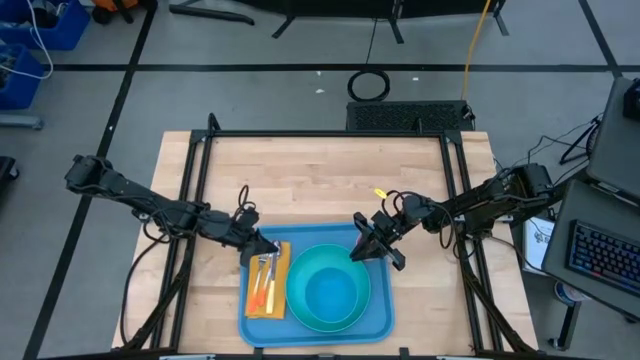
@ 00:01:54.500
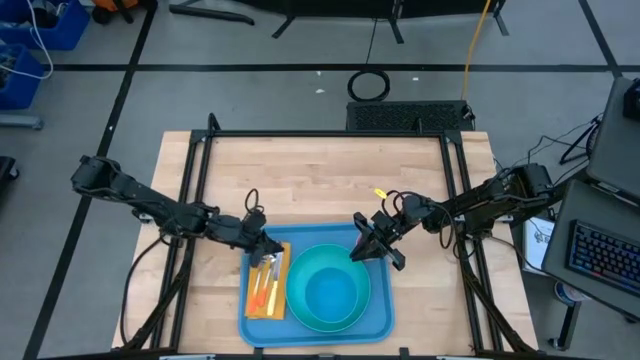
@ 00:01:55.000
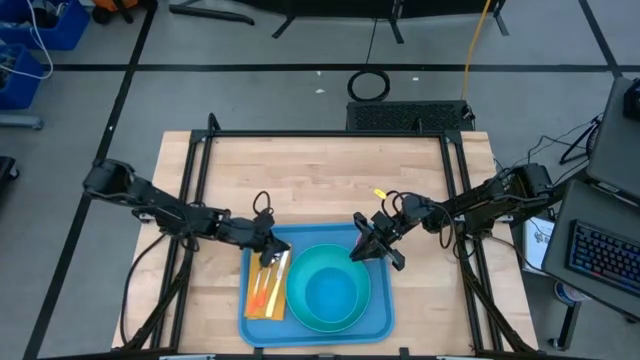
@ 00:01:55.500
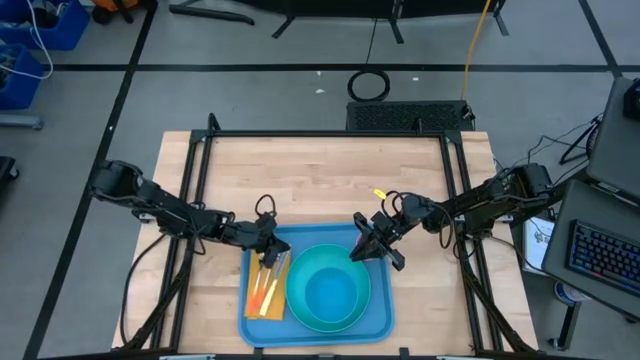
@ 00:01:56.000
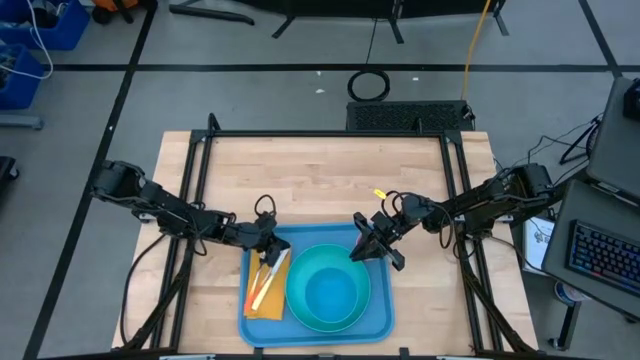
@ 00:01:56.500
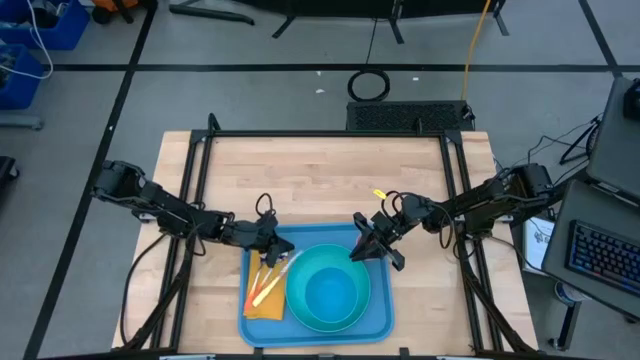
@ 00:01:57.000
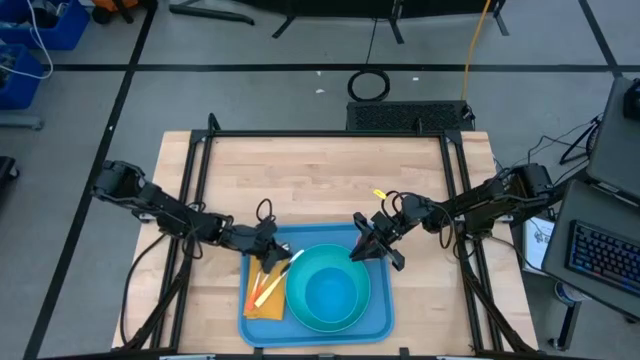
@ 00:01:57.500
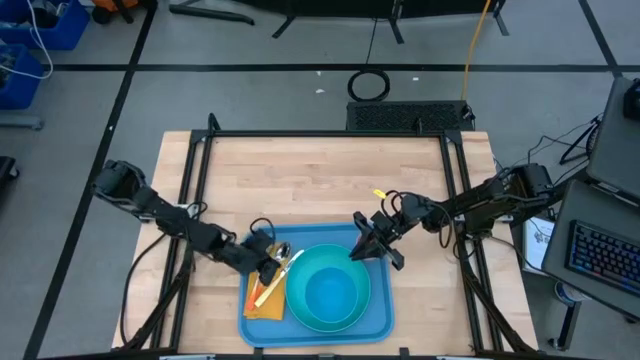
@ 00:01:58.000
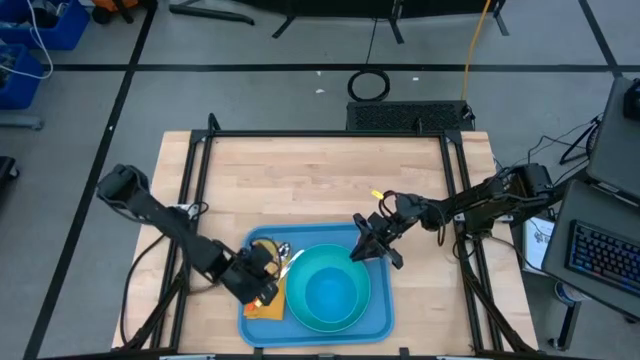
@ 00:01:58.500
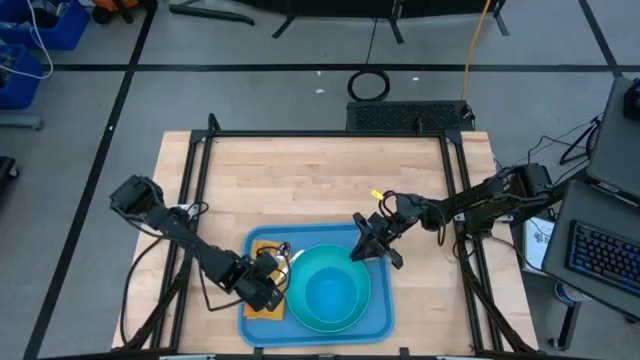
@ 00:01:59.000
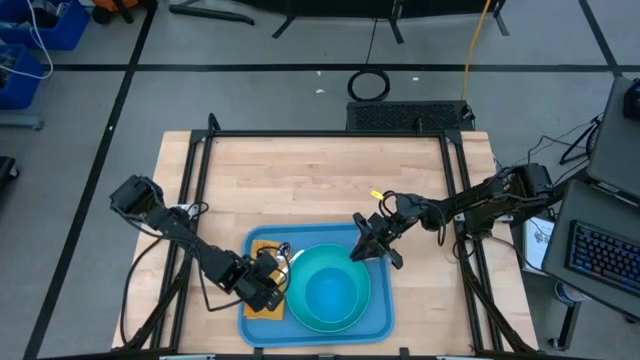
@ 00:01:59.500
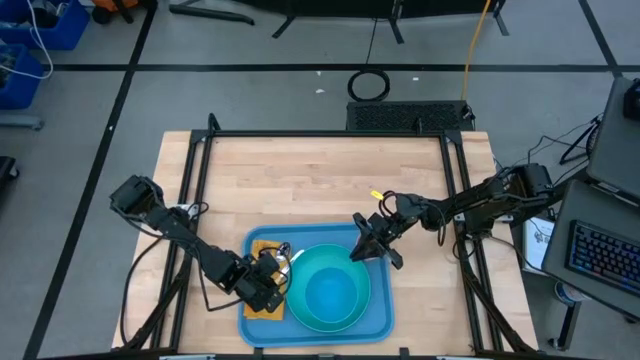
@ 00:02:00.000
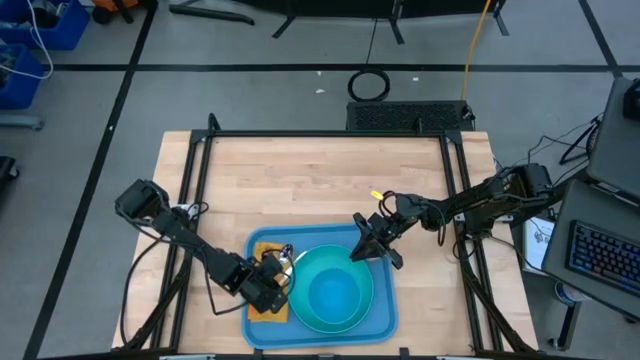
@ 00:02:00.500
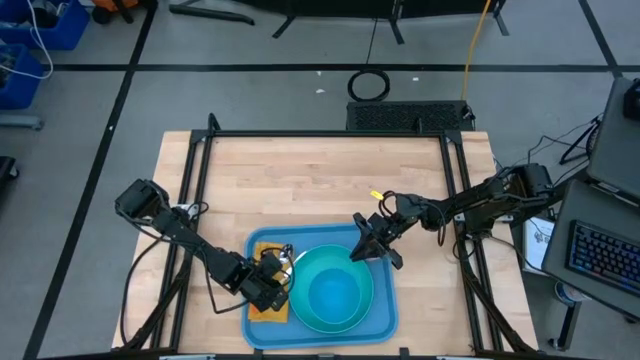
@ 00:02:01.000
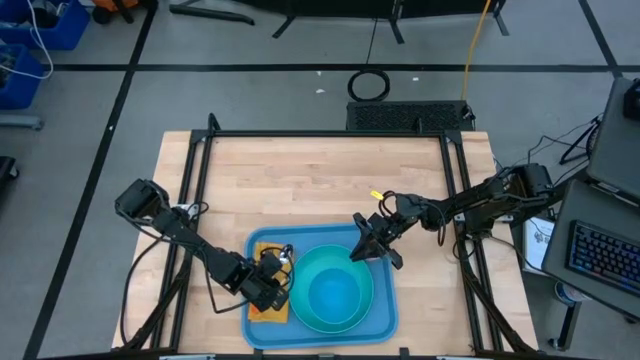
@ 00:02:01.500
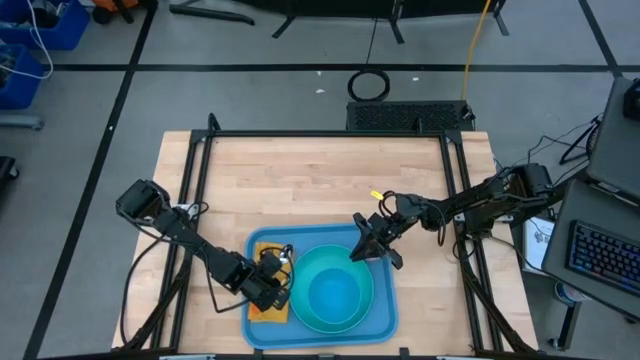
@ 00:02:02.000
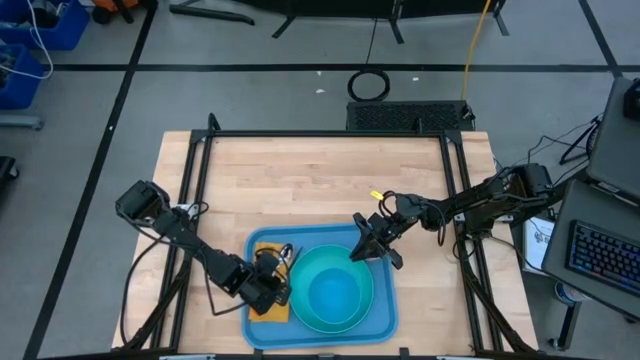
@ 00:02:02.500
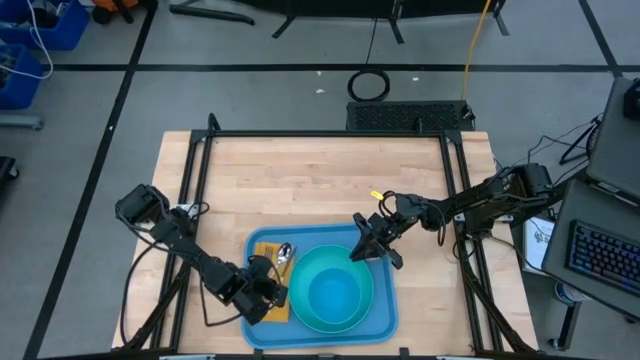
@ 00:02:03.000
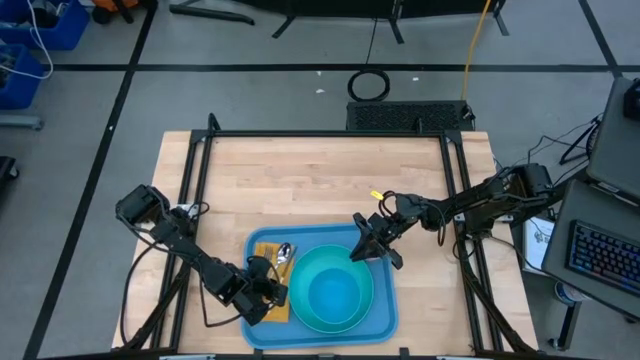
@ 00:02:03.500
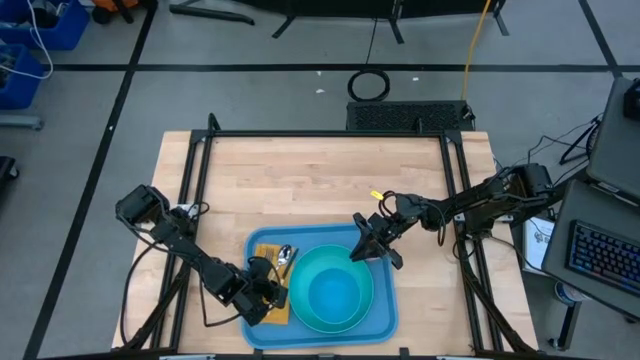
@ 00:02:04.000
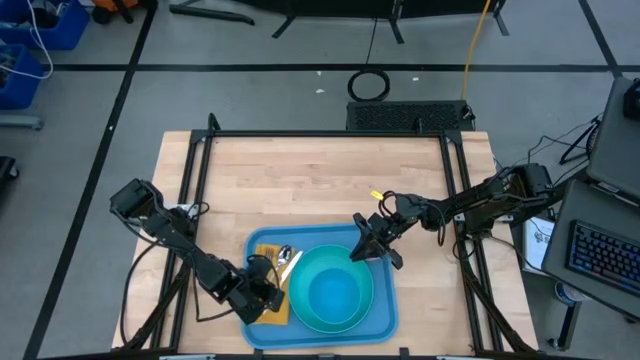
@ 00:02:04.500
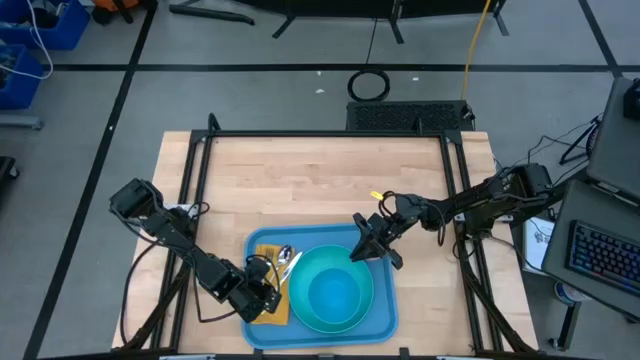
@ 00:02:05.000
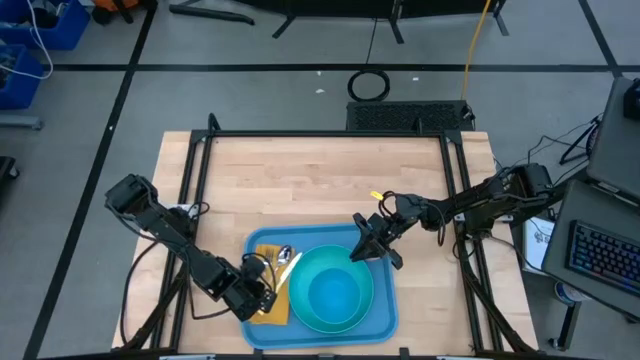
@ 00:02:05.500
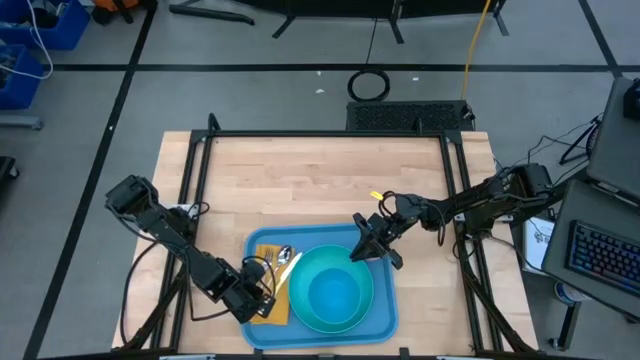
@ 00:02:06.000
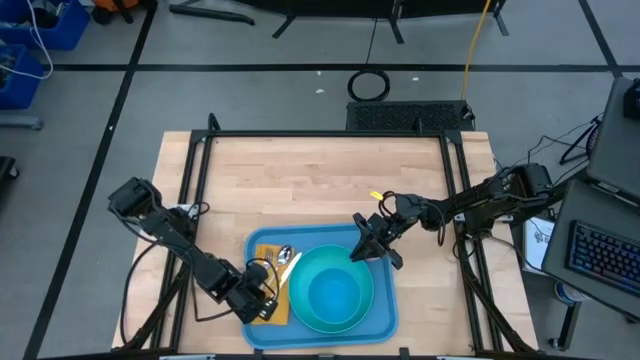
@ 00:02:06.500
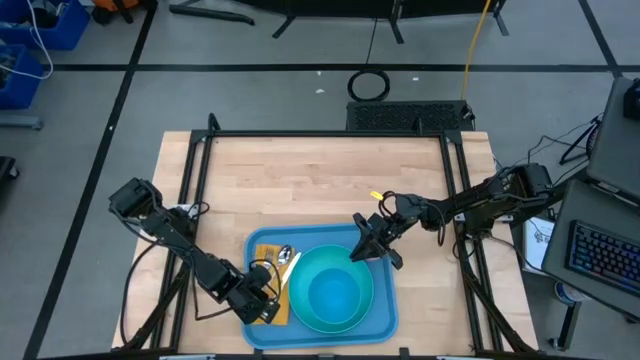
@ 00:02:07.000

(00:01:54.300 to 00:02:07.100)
Task: Set up tray
Put the white table knife on the top of the yellow table napkin to the right of the orange spoon

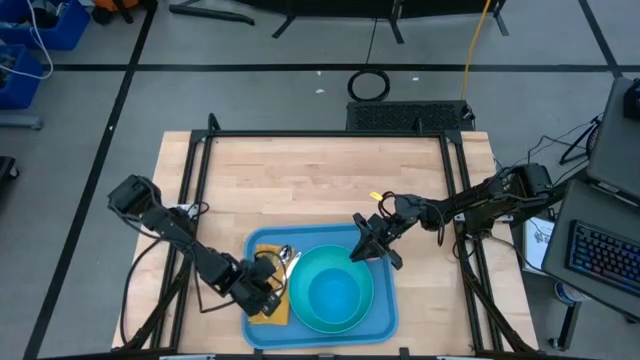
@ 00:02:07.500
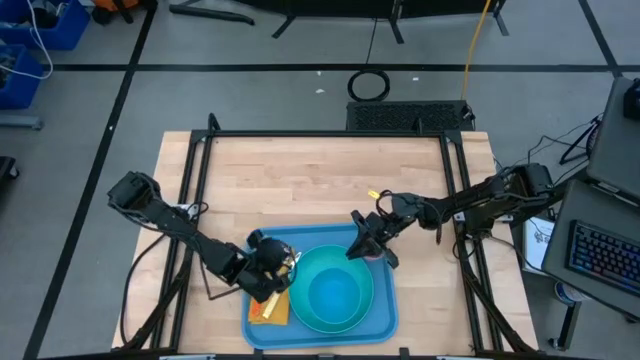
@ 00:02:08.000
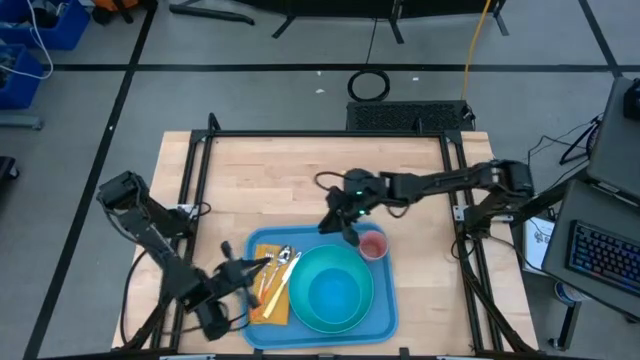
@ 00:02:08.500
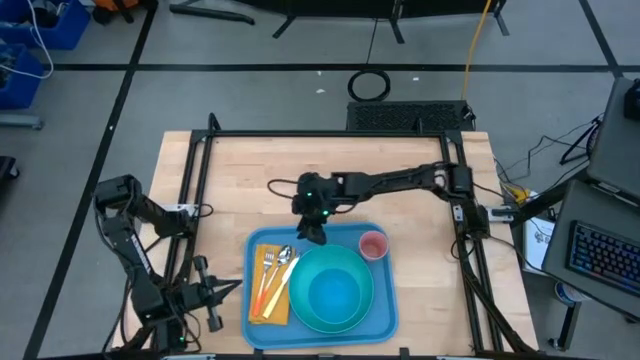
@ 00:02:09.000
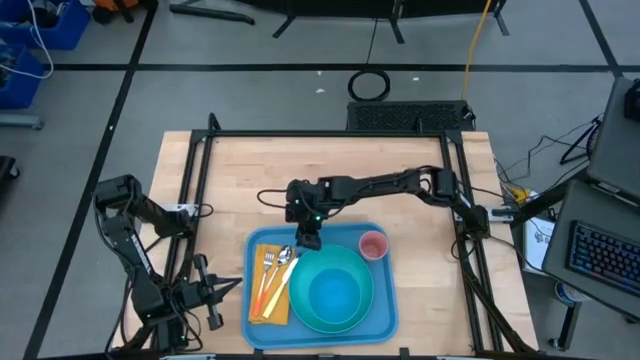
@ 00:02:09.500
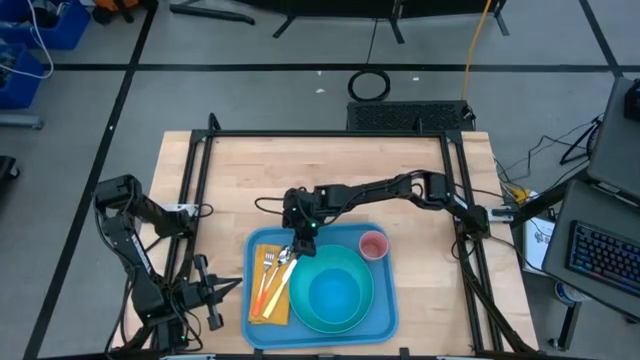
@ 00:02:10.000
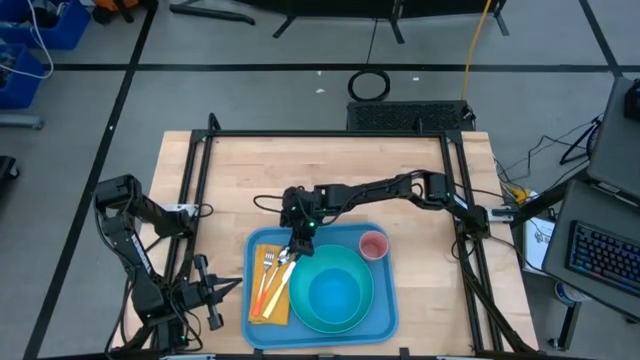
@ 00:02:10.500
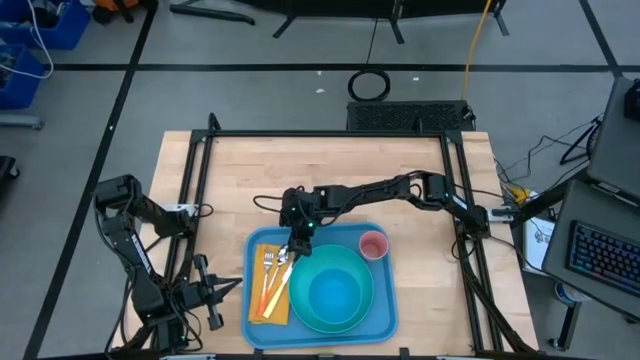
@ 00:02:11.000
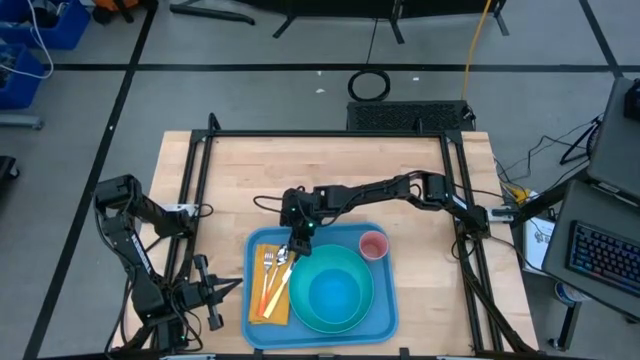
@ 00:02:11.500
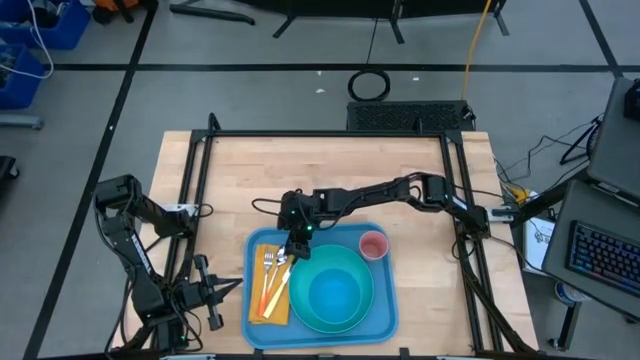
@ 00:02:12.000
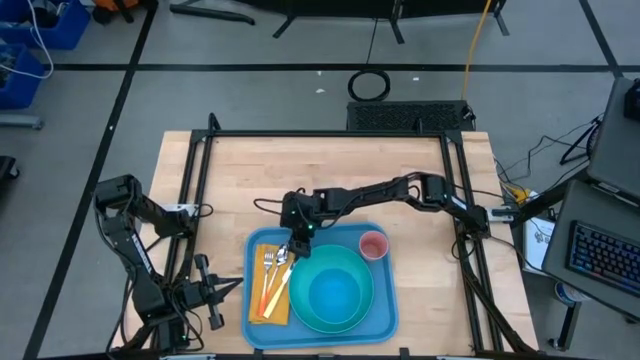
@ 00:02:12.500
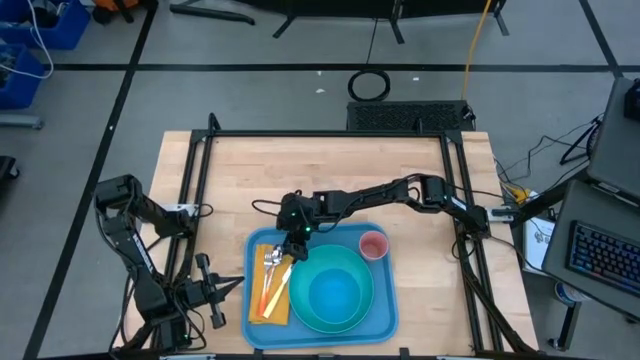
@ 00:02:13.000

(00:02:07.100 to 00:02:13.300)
Adjust the orange spoon on top of the yellow table napkin

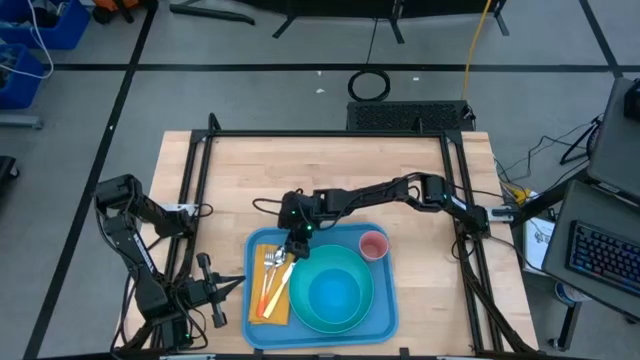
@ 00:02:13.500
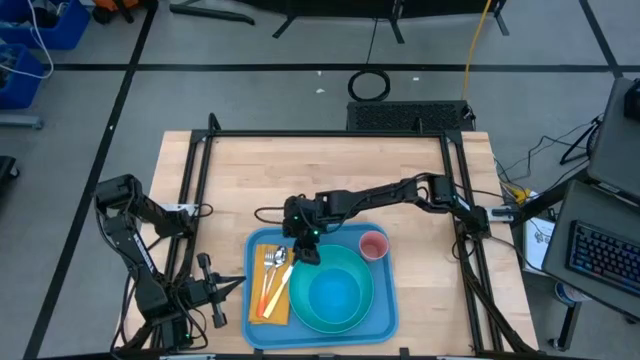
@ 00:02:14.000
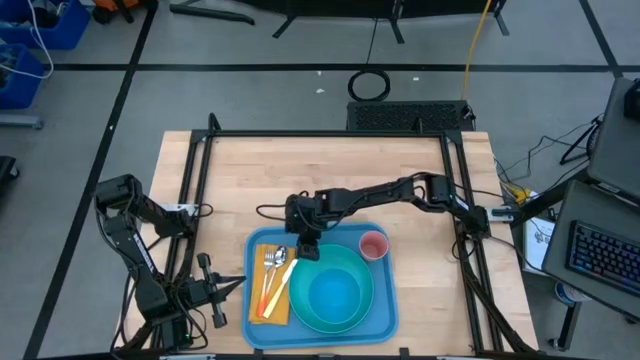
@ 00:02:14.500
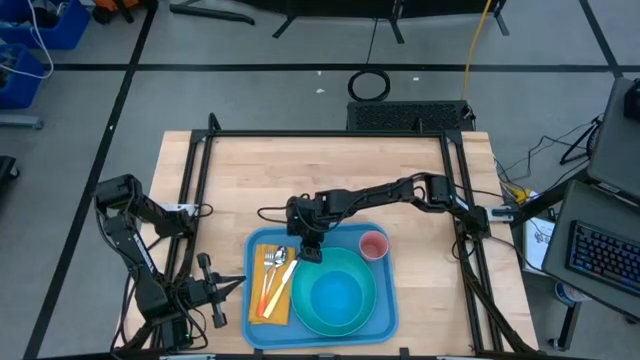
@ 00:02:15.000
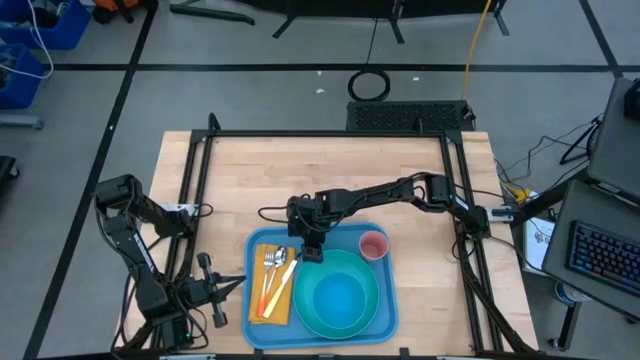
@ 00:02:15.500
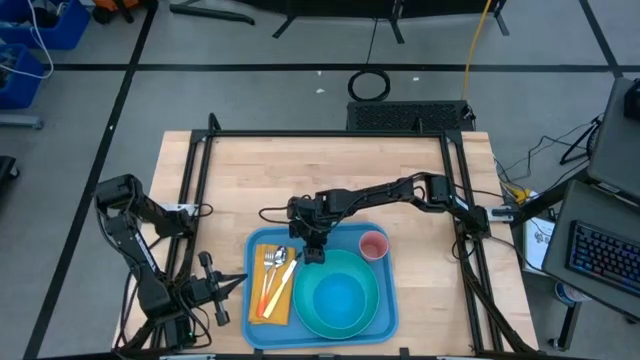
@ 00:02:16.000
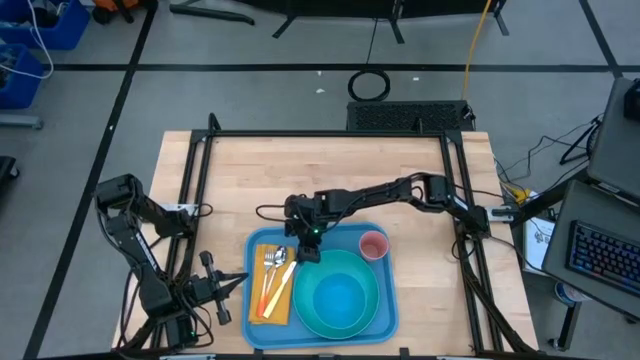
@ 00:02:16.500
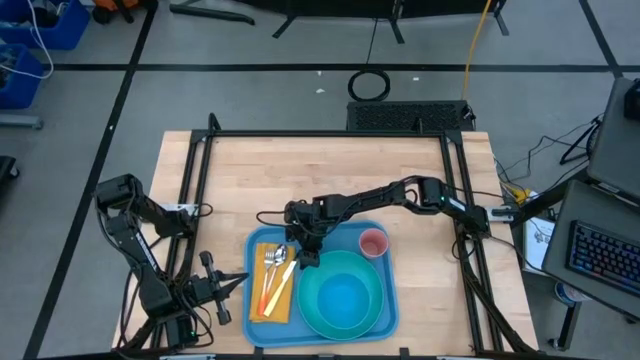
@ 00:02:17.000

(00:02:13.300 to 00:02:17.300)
Adjust the green plate on the blue tray
